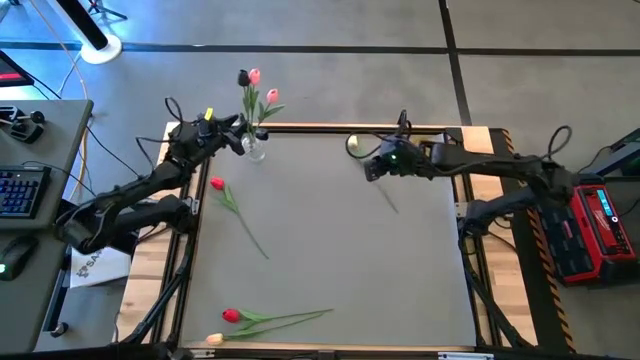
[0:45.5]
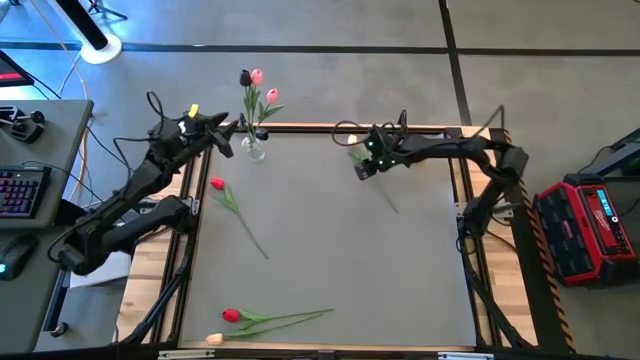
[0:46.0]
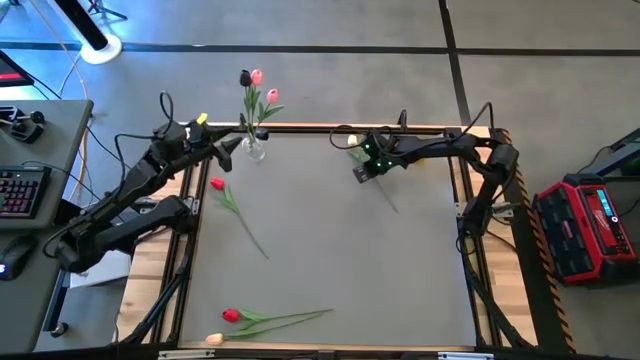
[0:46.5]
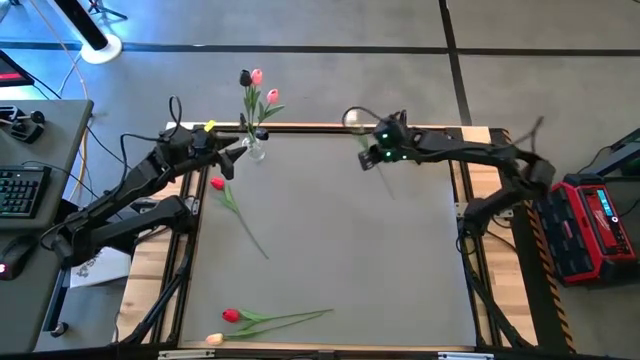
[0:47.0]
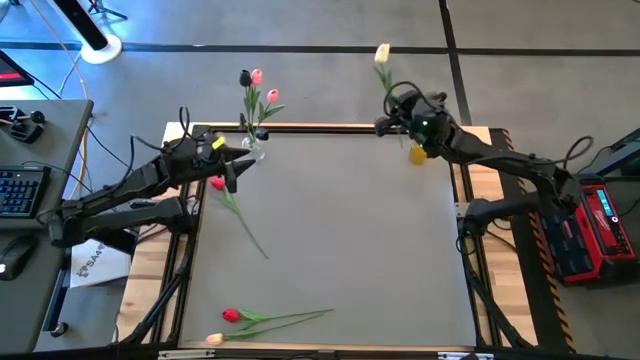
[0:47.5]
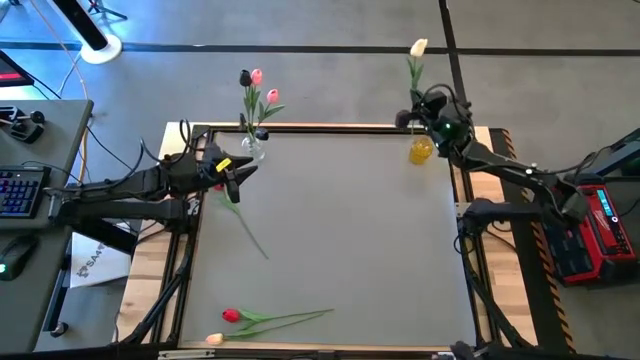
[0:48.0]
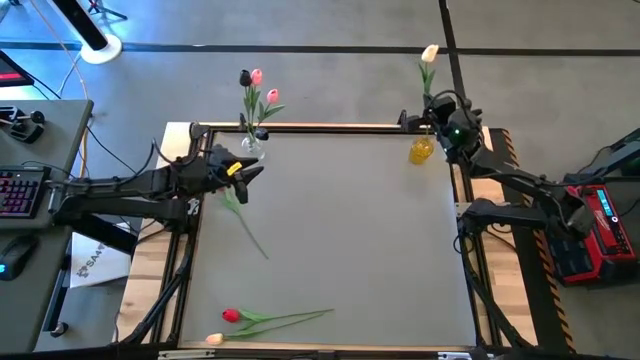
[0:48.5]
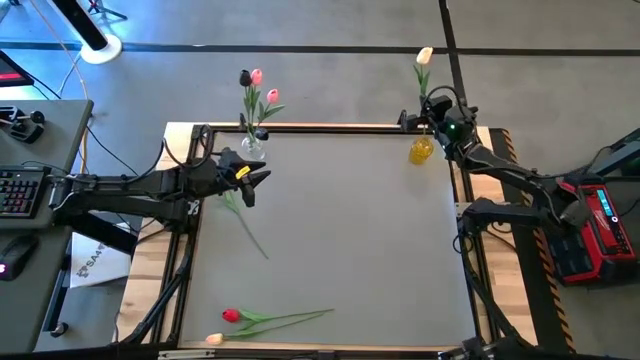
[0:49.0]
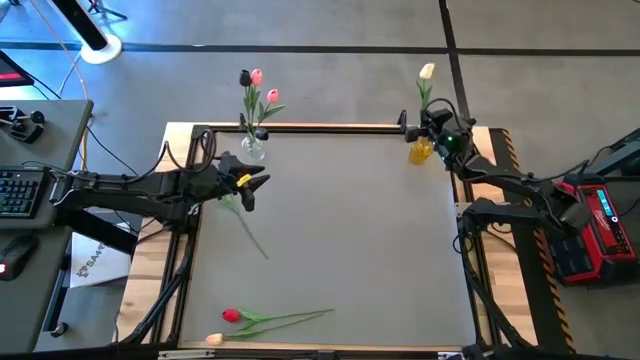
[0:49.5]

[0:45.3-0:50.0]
Task: Sort flowers into vase by color
Put the top light pink flower into the yellow vase

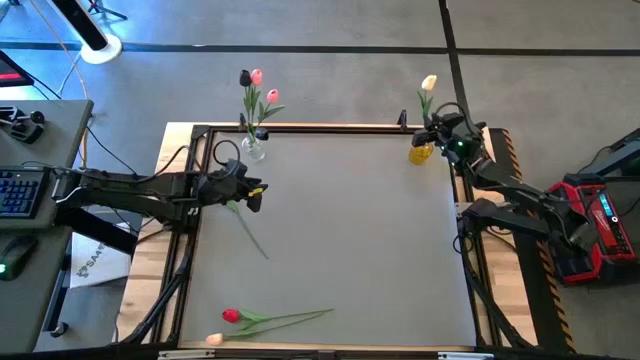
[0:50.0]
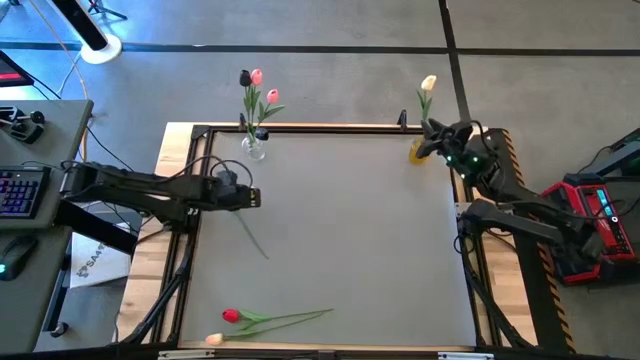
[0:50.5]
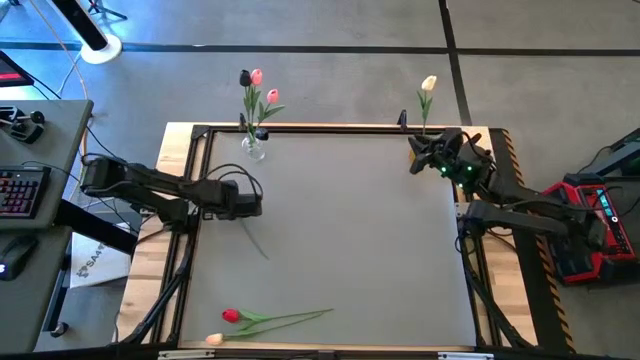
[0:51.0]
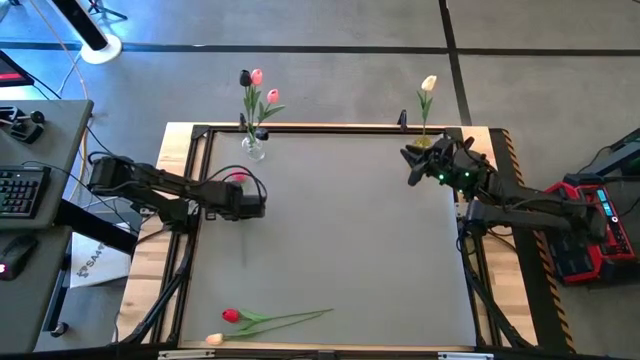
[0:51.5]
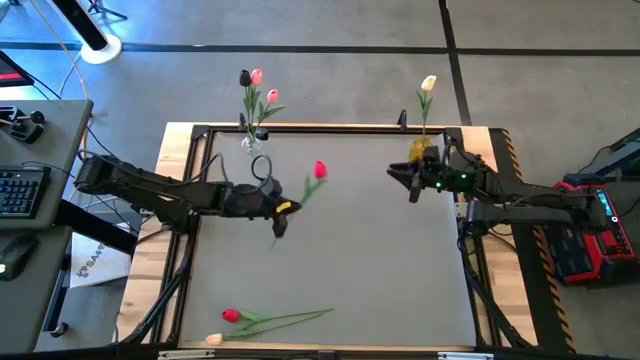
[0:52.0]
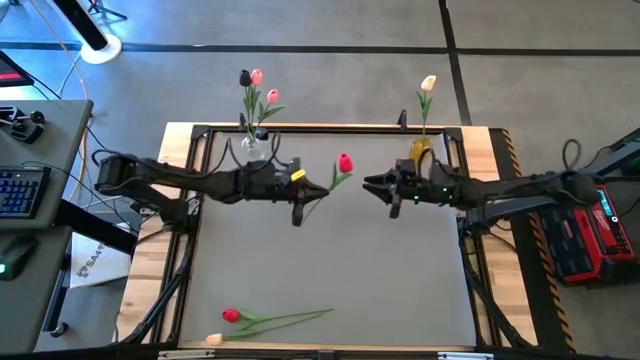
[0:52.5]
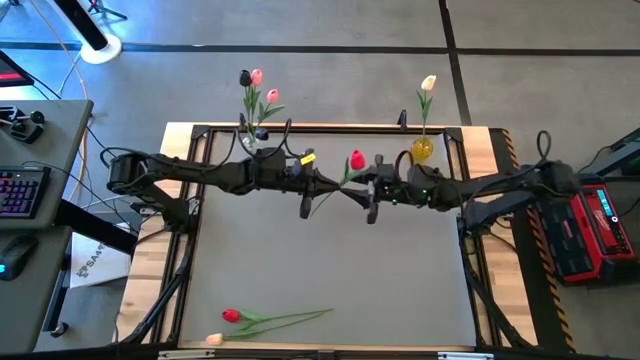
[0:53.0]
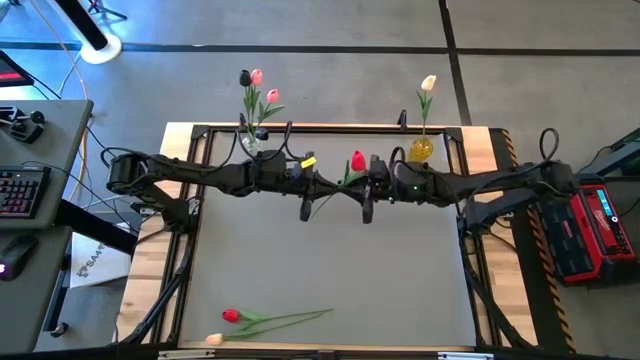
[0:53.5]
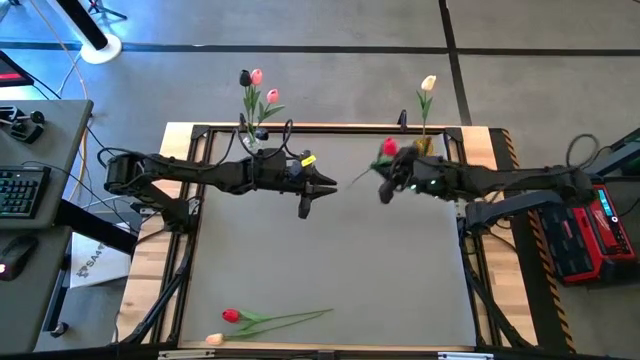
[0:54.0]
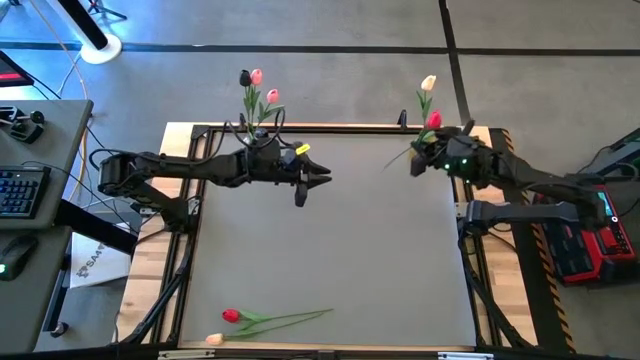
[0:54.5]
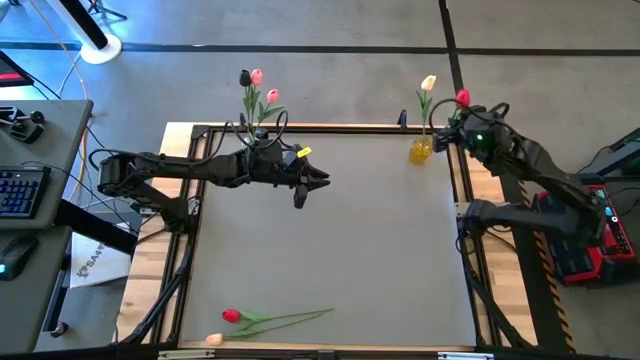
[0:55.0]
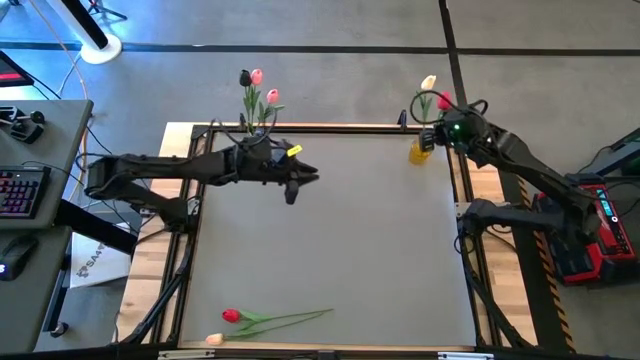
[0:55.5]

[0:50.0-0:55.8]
Put the top red flower into the yellow vase

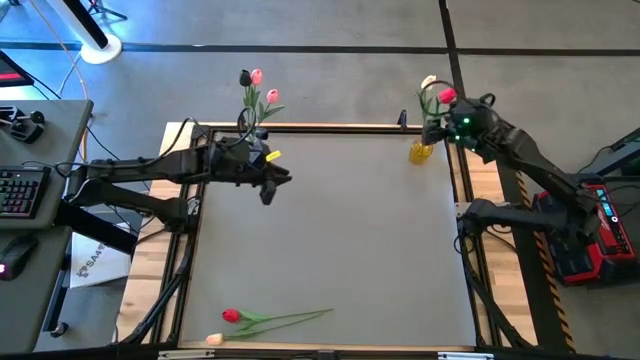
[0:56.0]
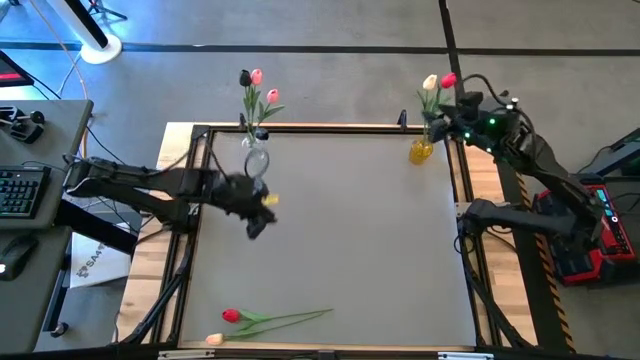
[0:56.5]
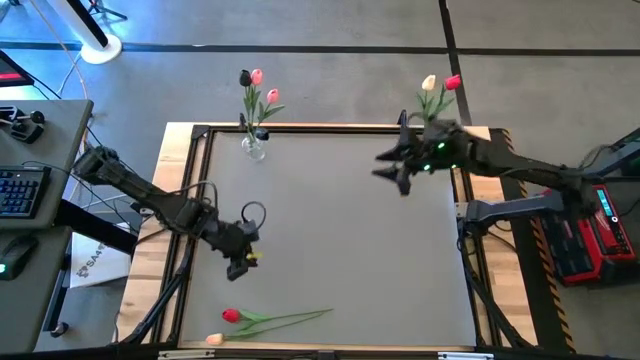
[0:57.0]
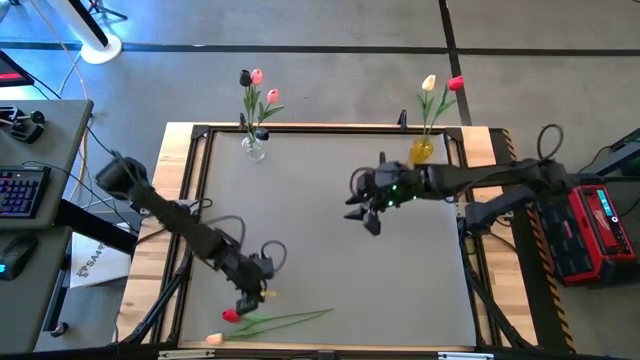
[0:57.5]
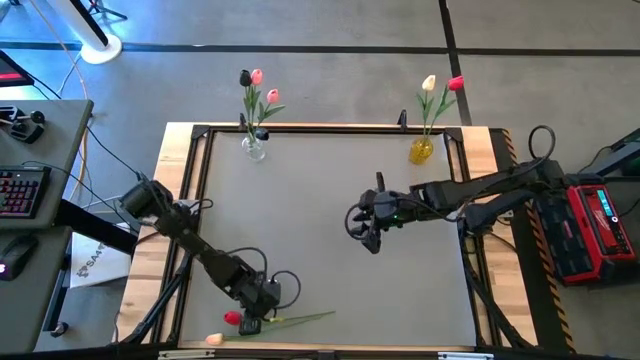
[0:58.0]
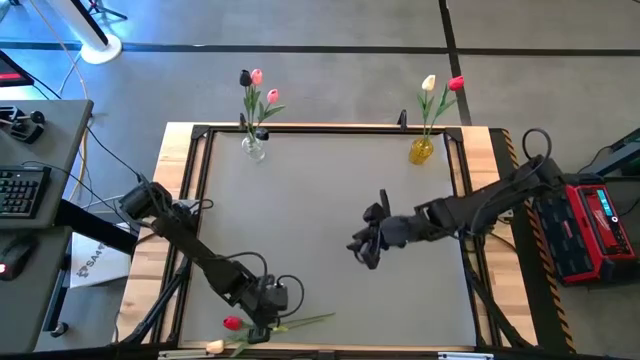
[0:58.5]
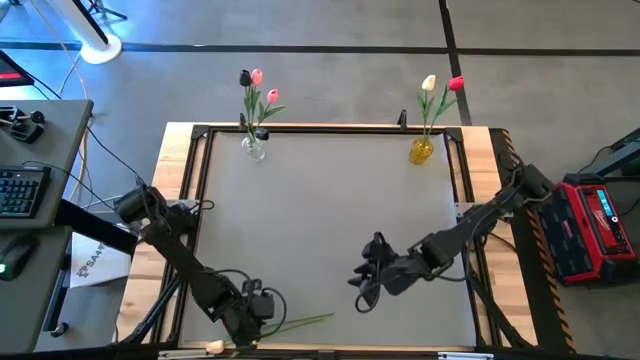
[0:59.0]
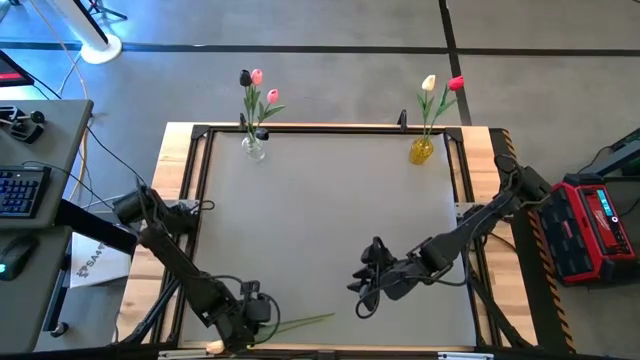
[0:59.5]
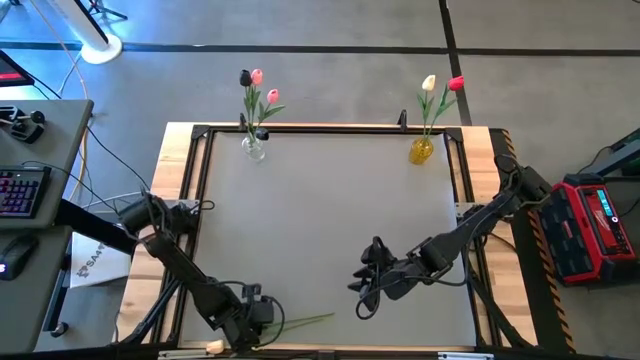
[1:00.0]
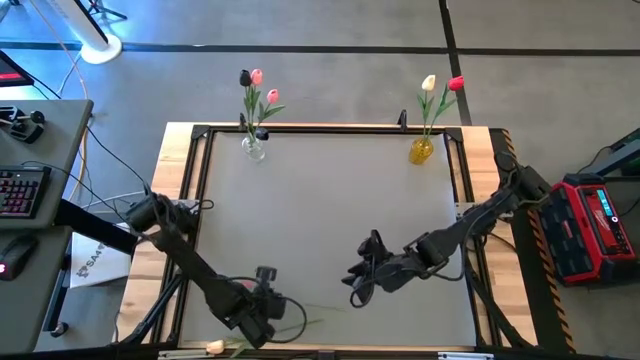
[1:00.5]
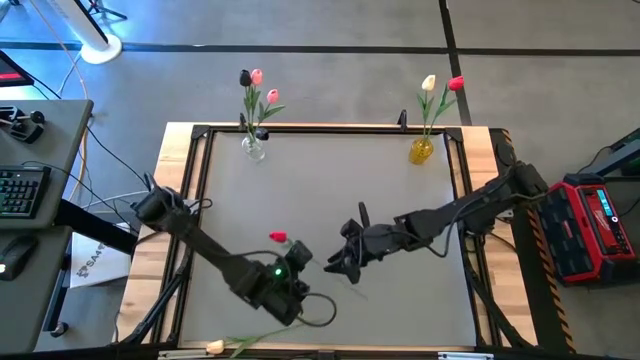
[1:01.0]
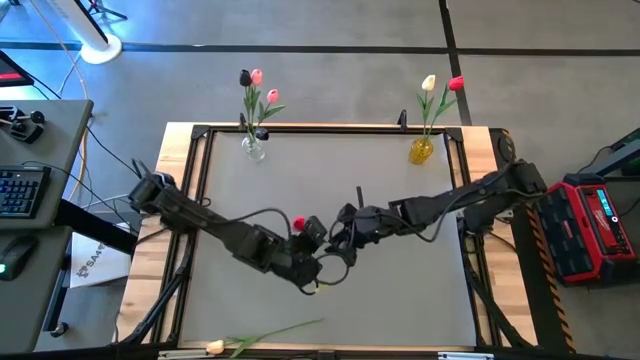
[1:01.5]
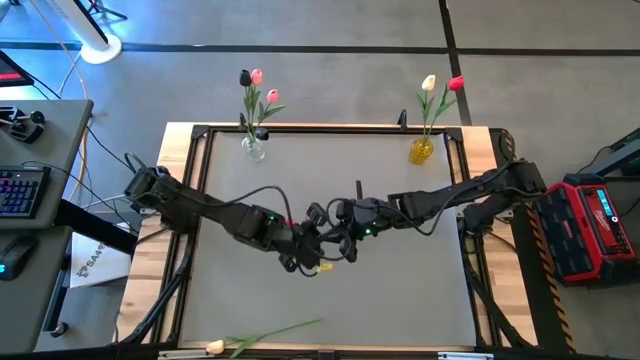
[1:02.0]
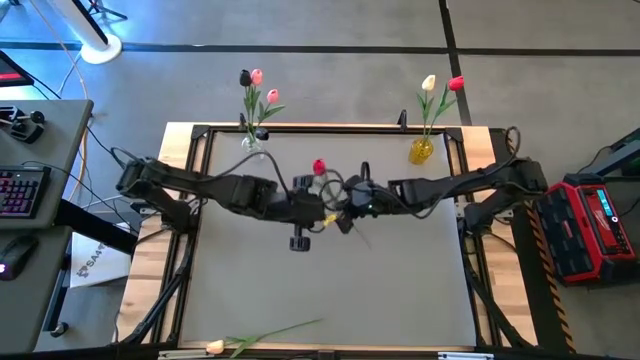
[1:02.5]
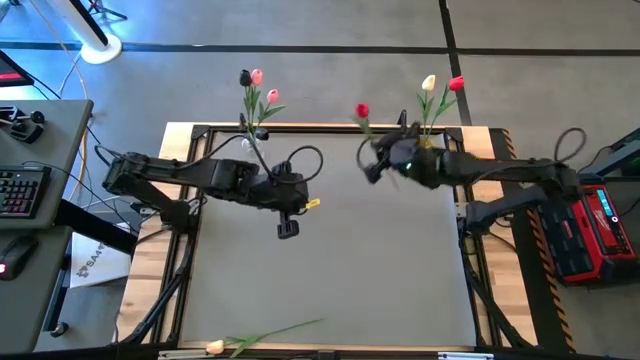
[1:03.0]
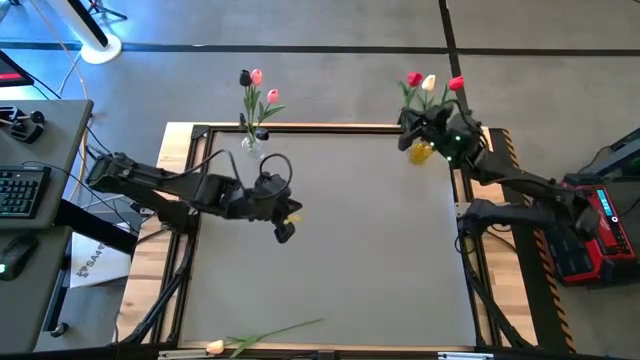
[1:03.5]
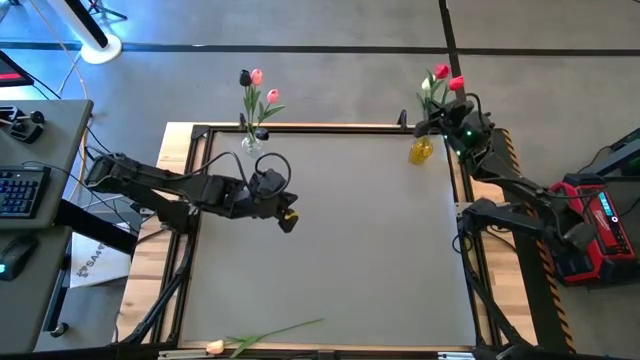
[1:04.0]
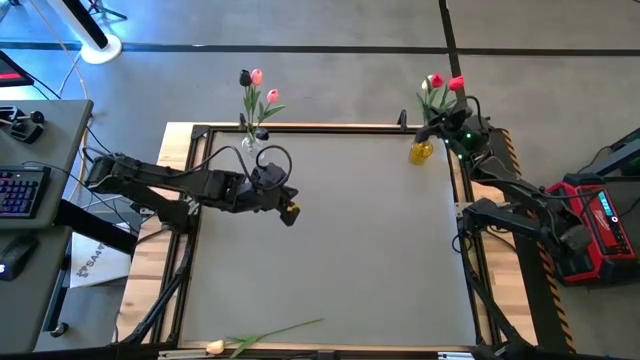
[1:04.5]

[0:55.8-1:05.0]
Put the red flower into the yellow vase

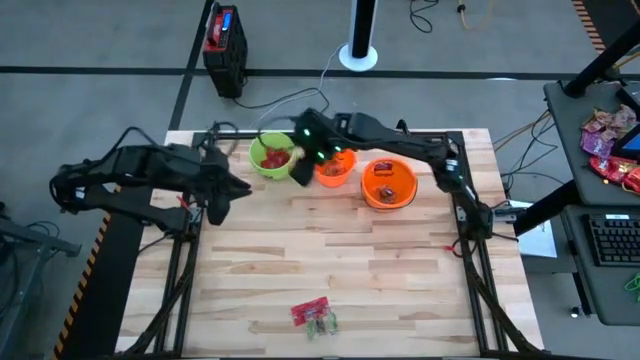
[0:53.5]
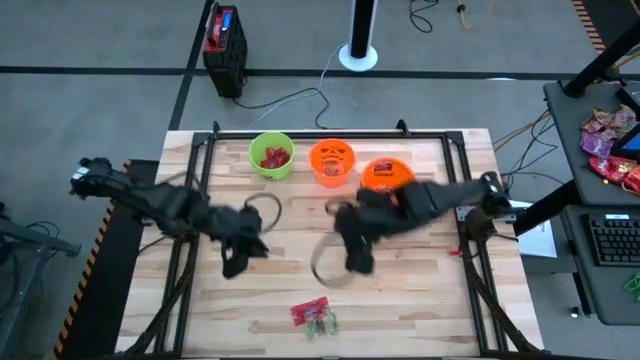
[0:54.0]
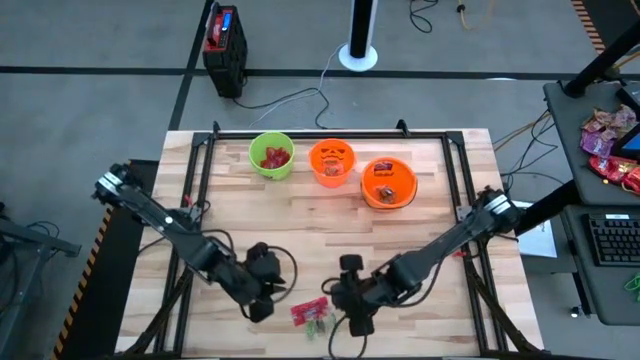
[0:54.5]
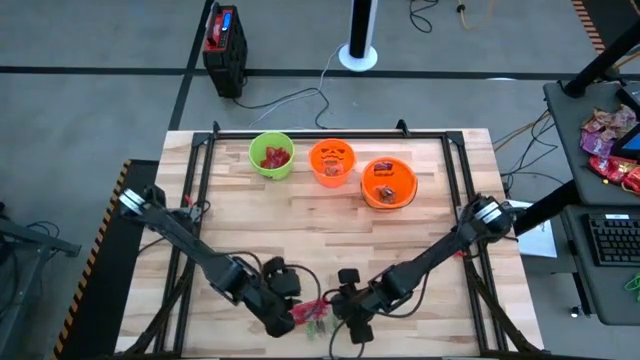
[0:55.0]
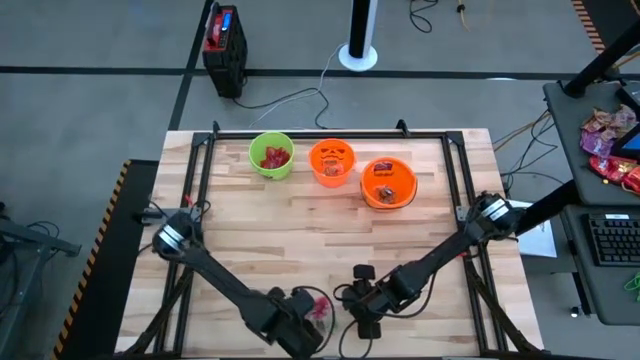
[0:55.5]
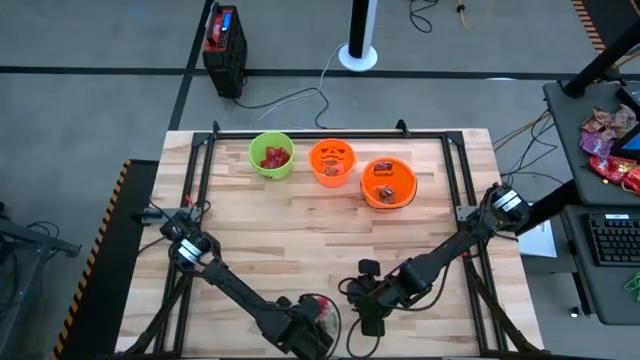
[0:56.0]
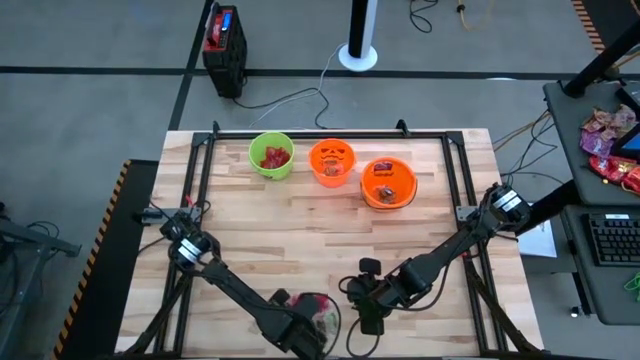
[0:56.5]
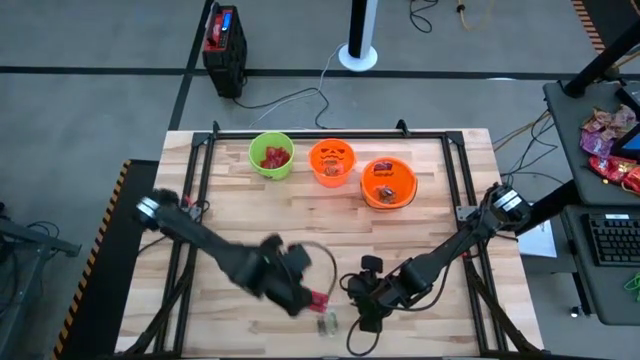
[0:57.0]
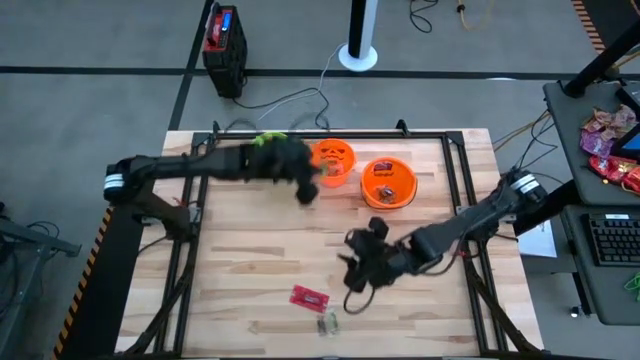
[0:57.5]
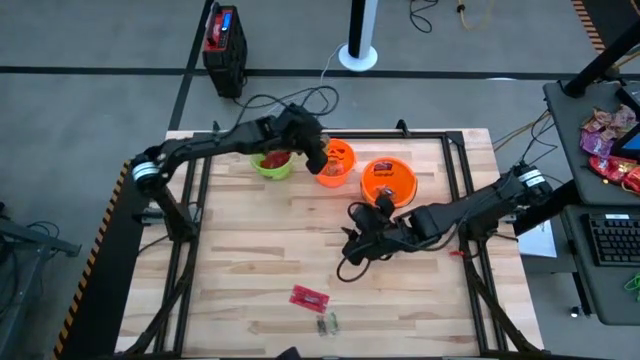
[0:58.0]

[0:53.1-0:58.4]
Task: Sort candy by brand, put in halloween buckets
Put the green gummy into the left orange bucket
